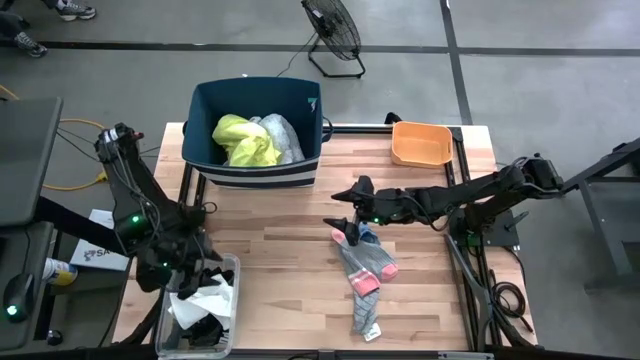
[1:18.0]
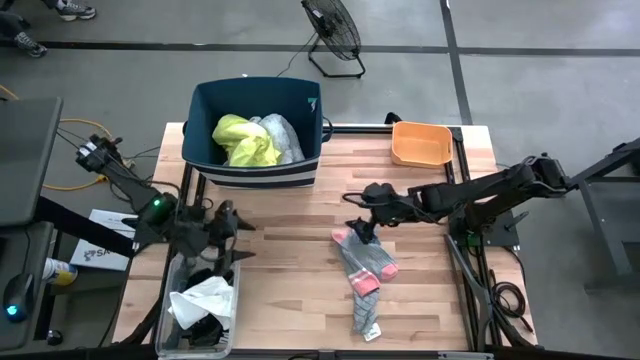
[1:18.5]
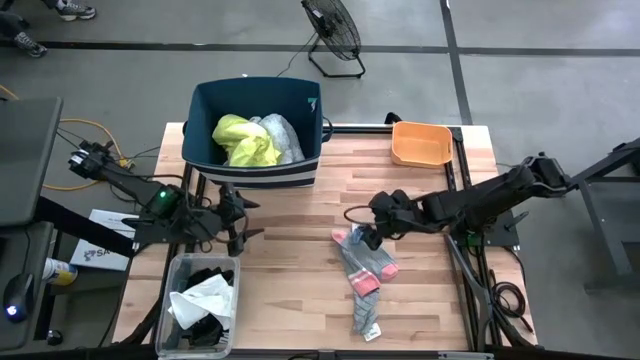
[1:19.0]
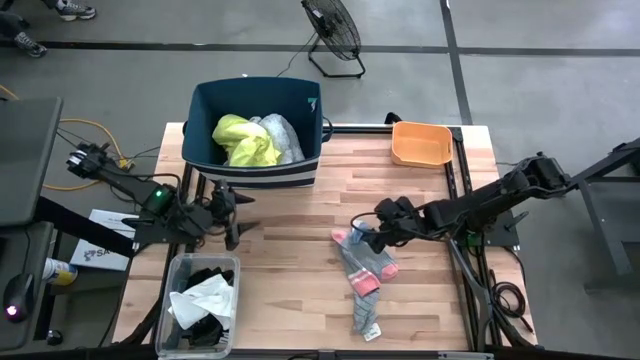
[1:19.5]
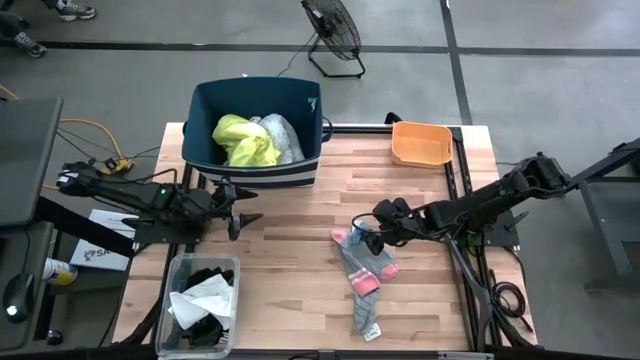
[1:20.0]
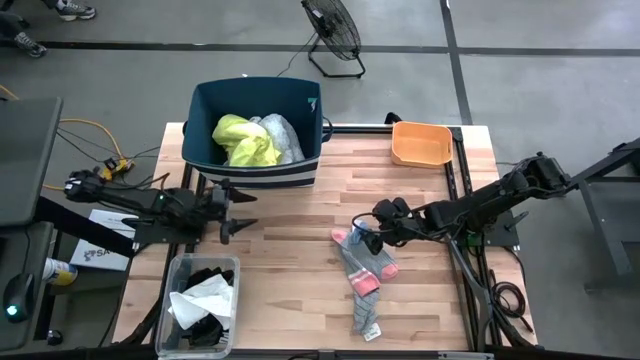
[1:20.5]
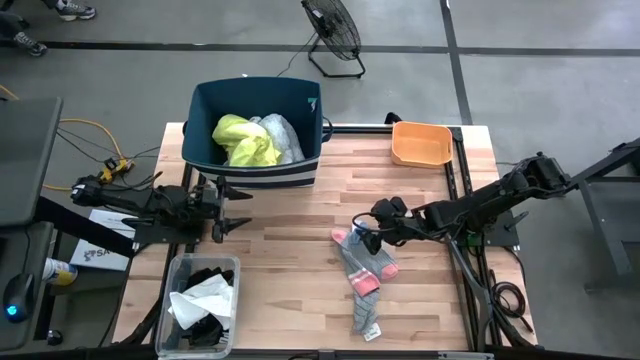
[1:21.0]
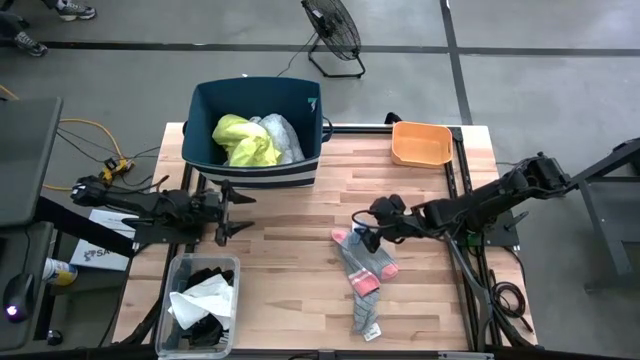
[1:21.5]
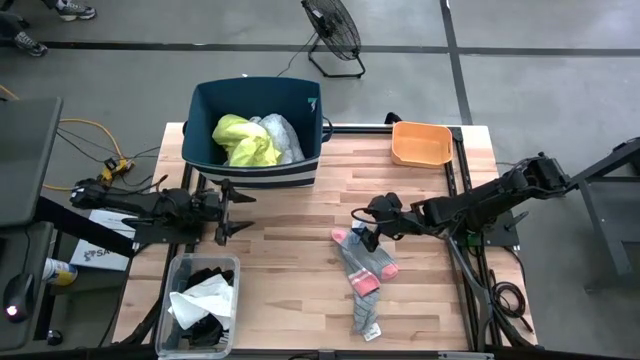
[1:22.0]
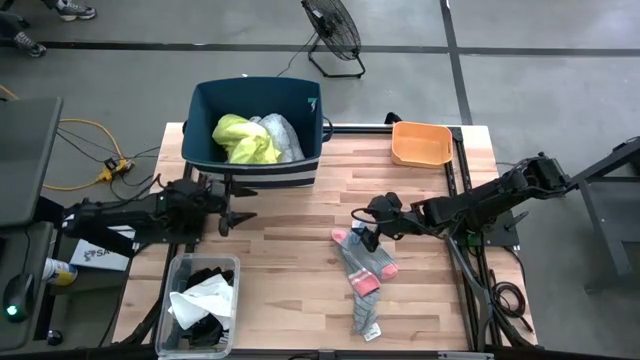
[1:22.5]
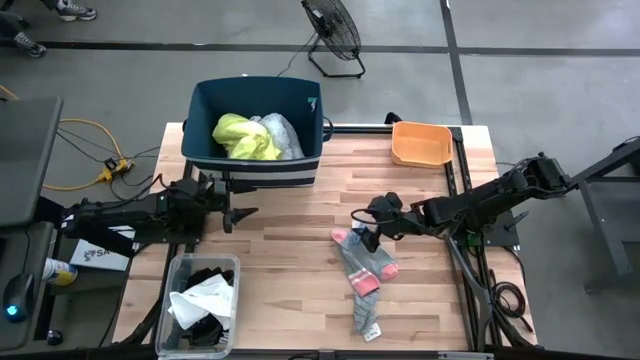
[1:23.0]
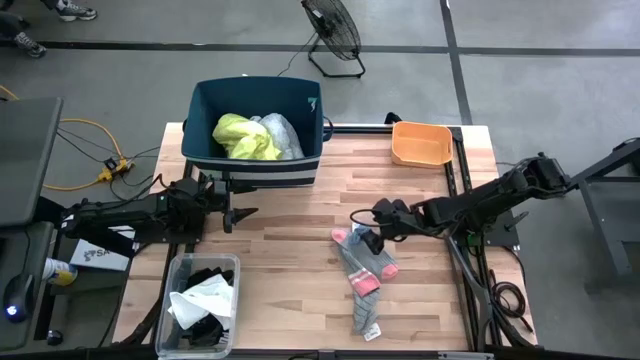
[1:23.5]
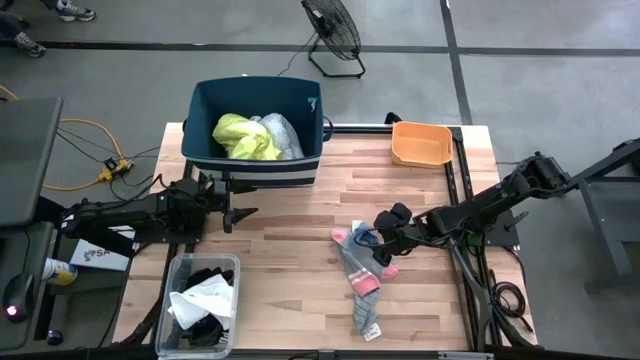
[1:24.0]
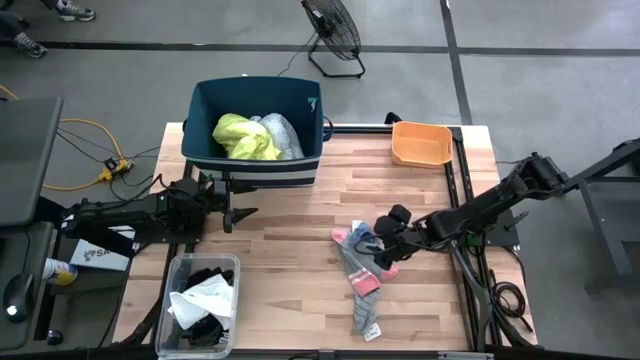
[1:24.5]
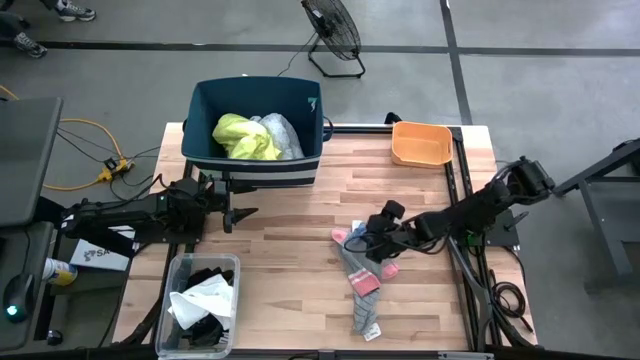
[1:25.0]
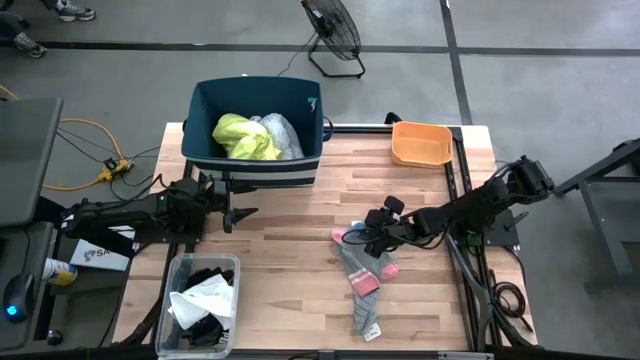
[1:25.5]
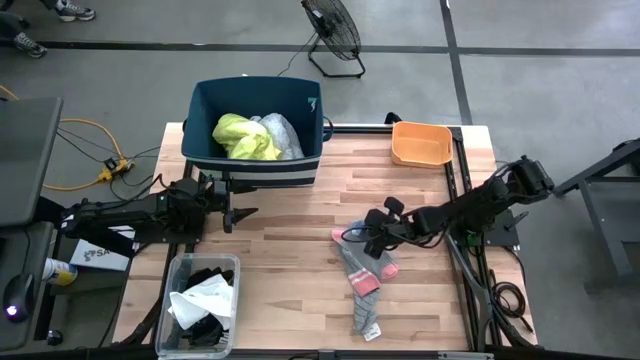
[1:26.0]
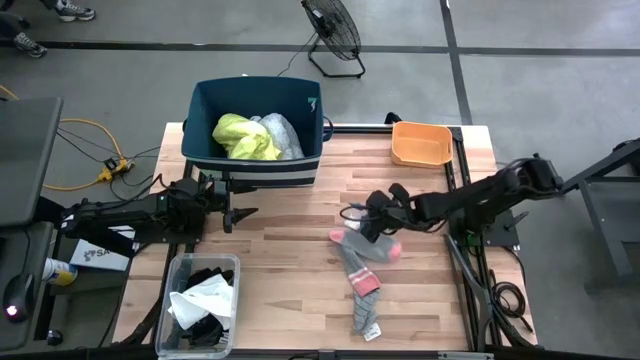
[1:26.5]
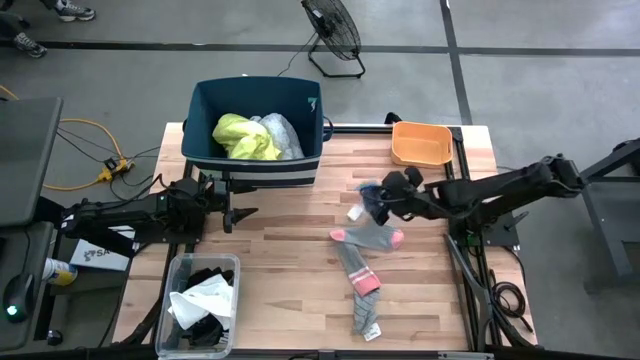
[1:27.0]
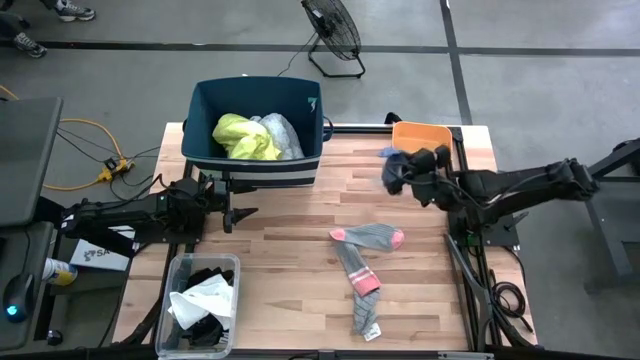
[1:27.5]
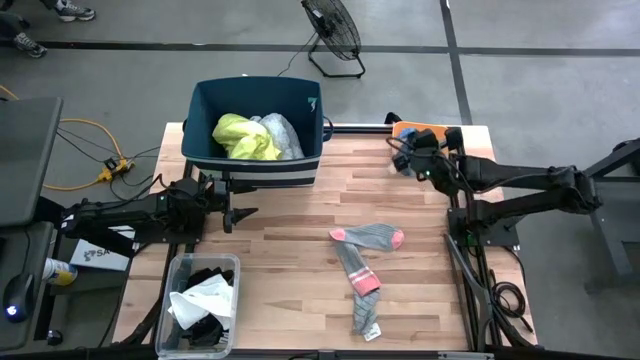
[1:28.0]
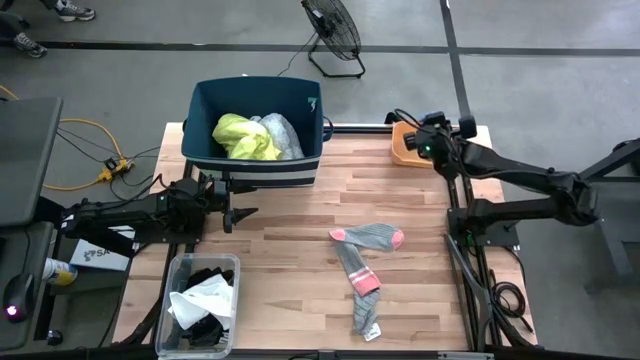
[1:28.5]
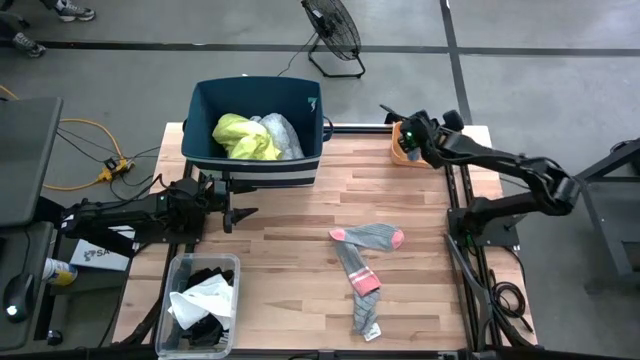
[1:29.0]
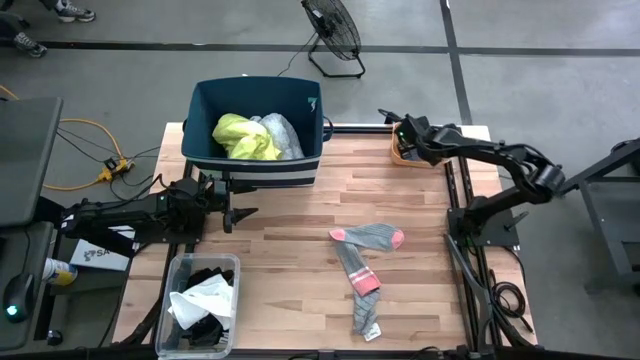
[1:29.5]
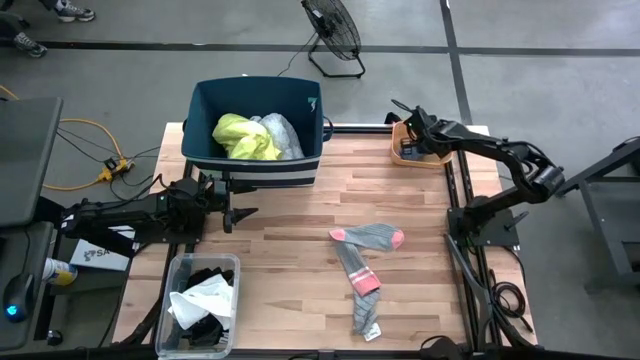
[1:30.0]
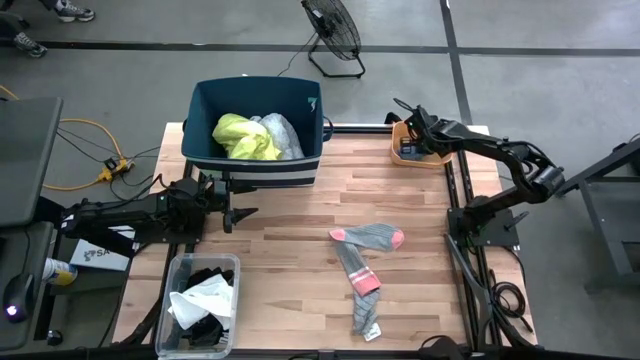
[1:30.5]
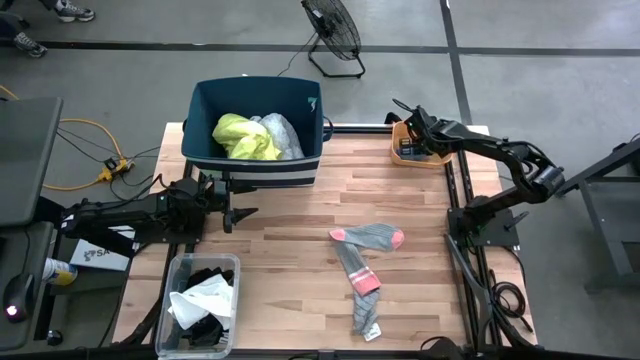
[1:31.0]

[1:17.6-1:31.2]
Task: Pick & Place Cloths
Put the blue sock into the orange bin

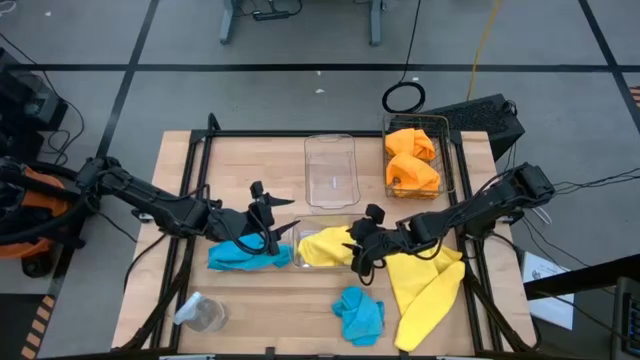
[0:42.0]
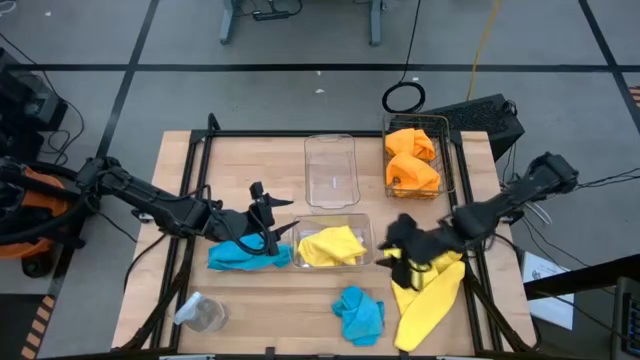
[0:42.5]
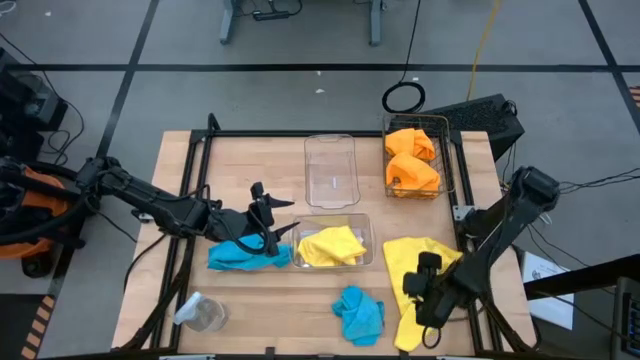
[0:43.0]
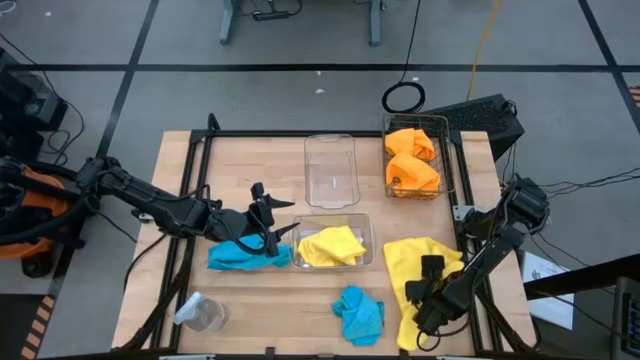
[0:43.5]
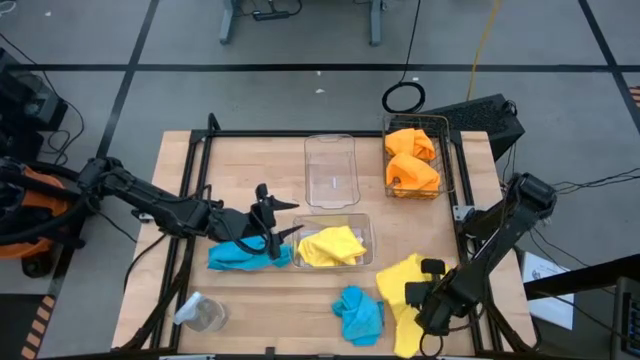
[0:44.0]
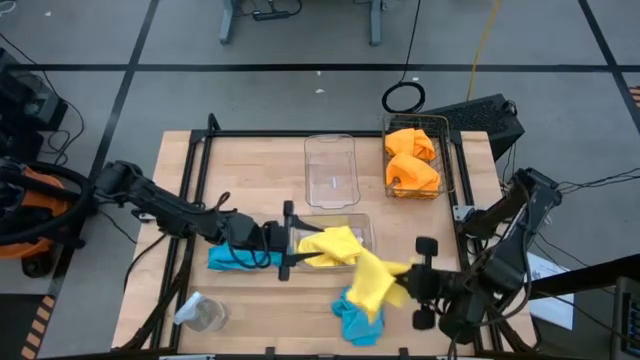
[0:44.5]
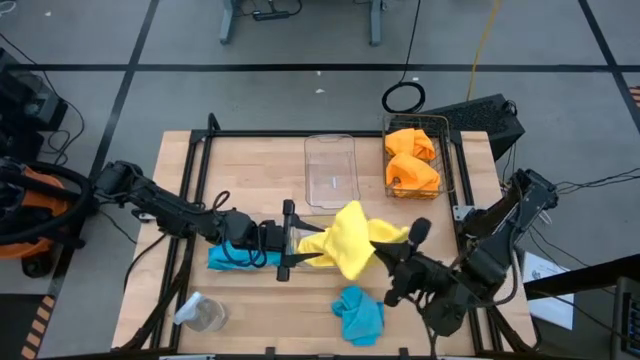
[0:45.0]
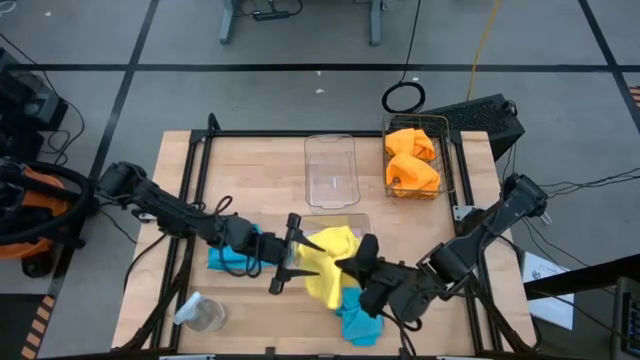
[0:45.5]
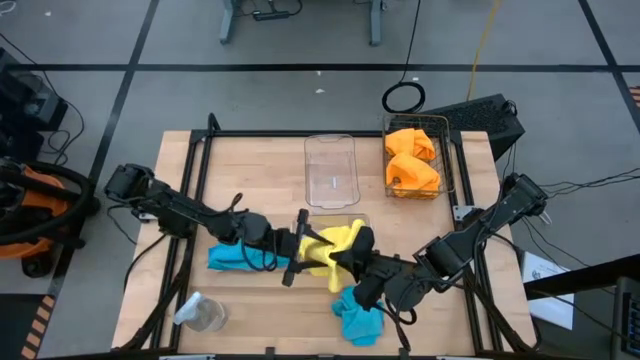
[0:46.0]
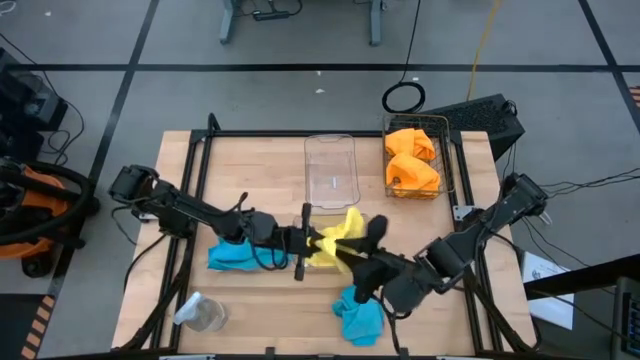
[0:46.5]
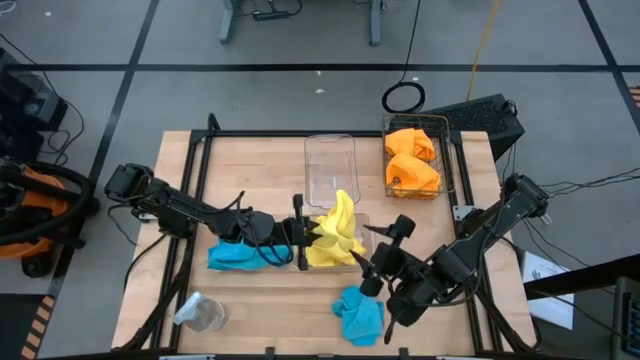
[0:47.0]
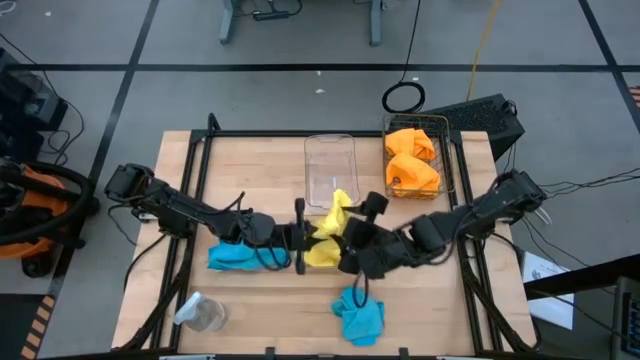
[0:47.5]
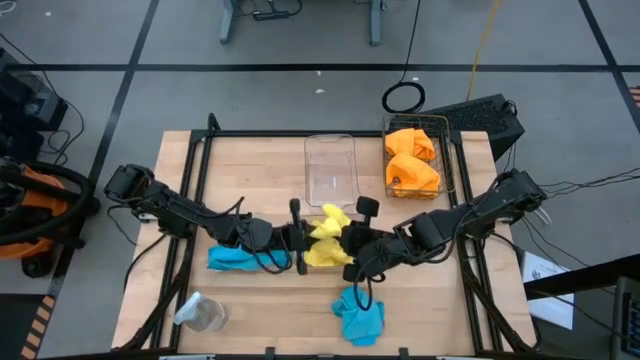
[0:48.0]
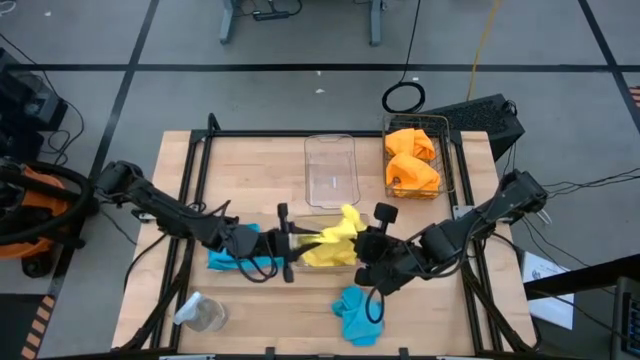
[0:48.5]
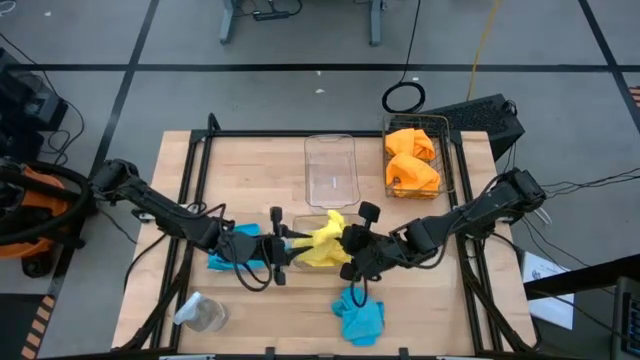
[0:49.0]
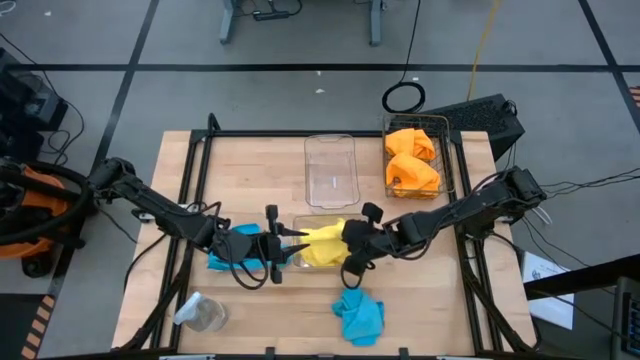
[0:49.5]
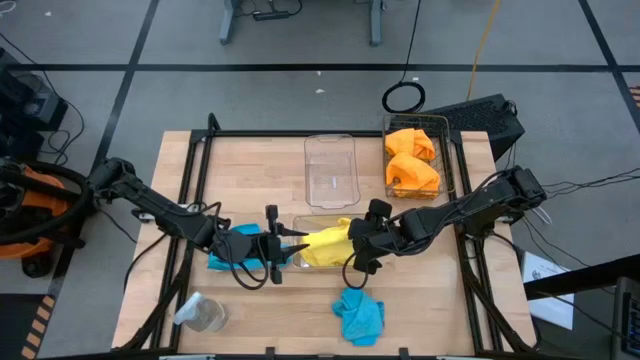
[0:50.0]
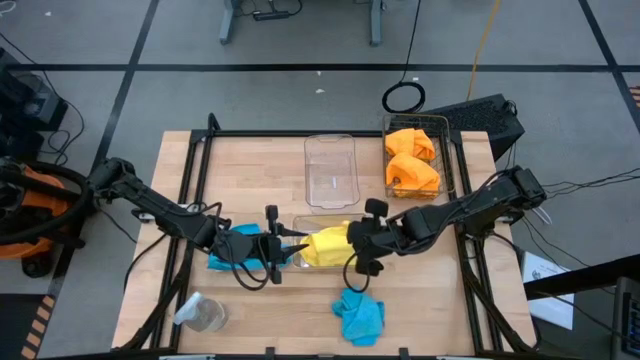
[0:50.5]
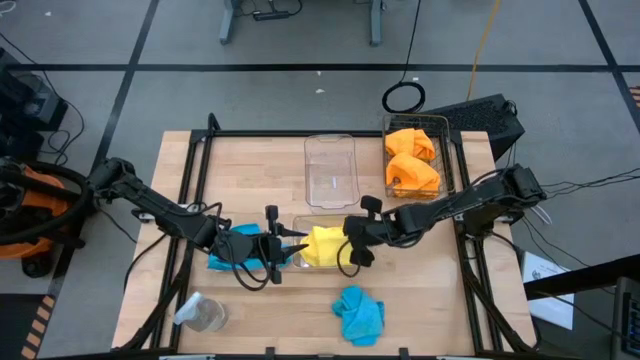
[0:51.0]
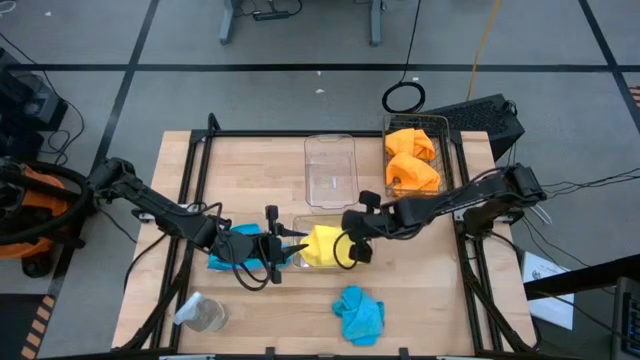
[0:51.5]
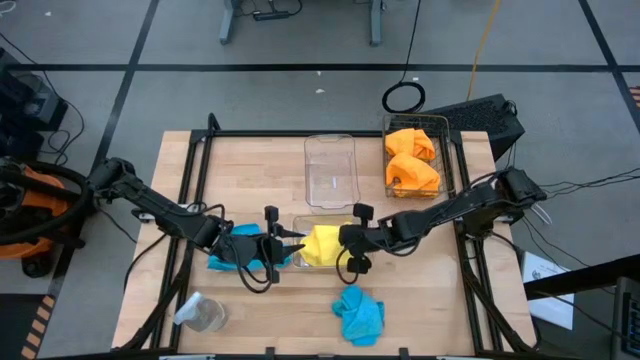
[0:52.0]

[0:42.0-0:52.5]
Task: Sort microfiber towel by color & place in baskets
Put the yellow microfiber towel into the bottom transparent bin
